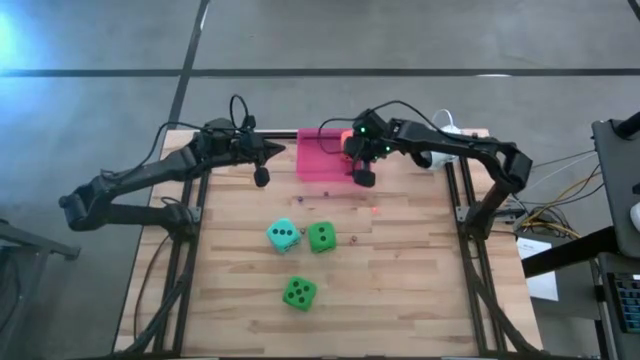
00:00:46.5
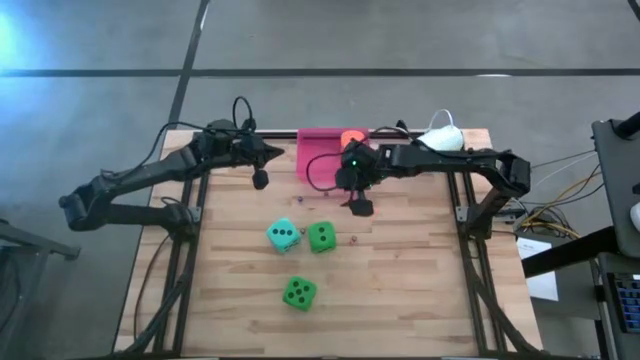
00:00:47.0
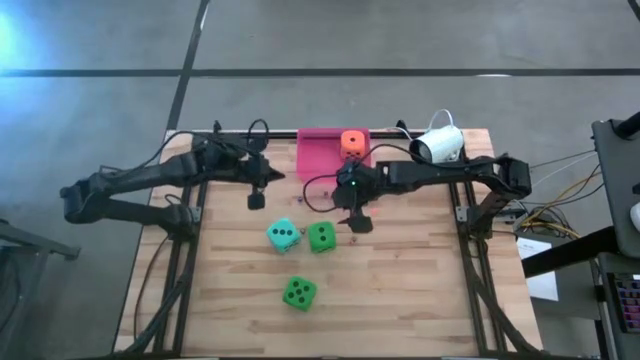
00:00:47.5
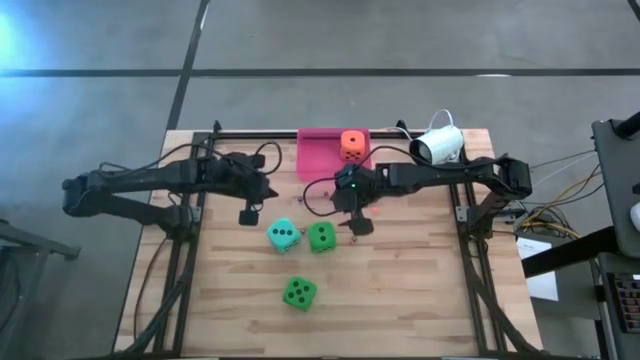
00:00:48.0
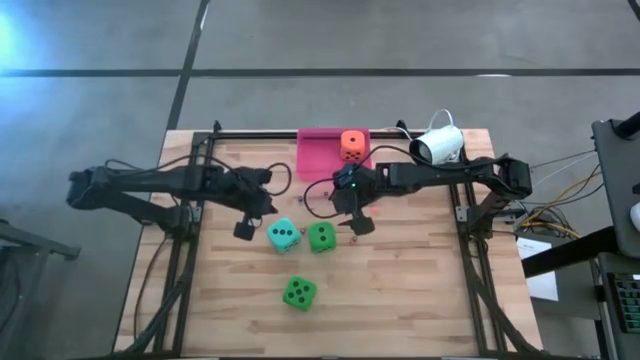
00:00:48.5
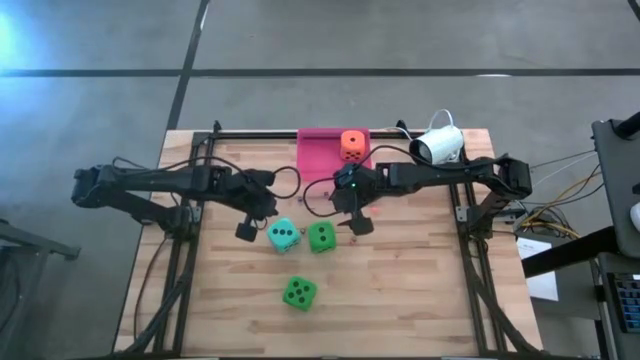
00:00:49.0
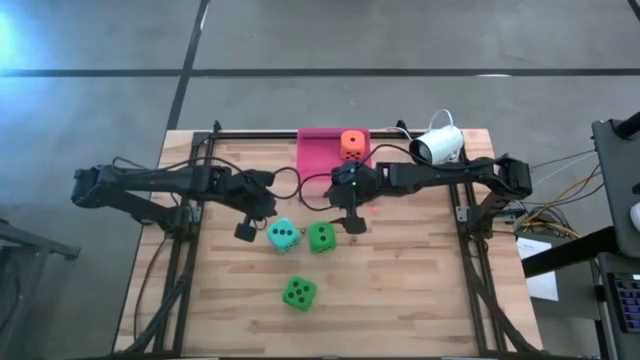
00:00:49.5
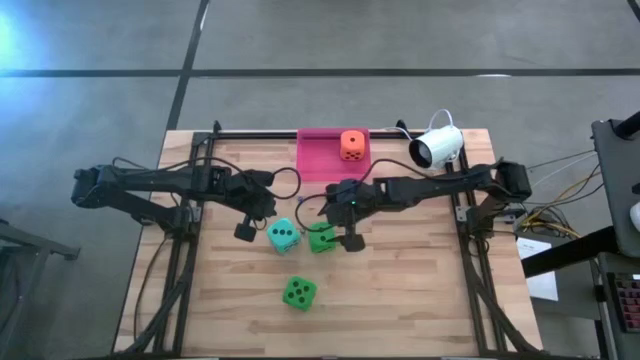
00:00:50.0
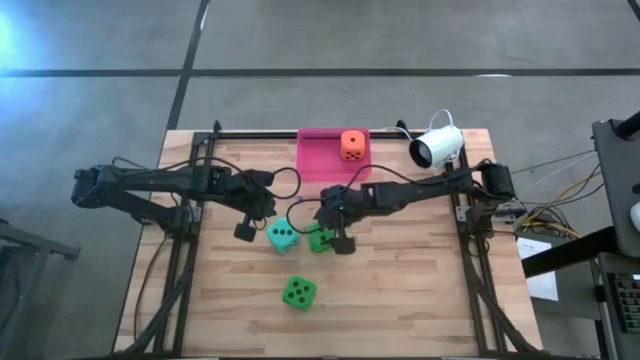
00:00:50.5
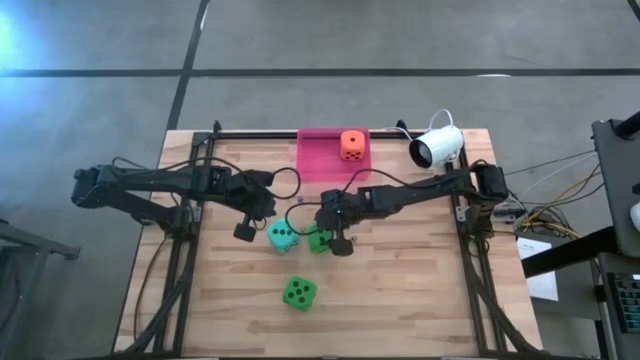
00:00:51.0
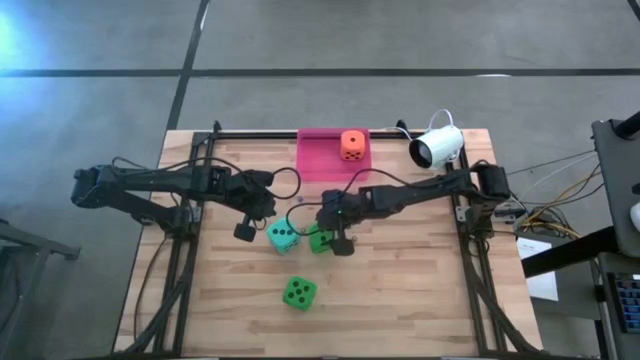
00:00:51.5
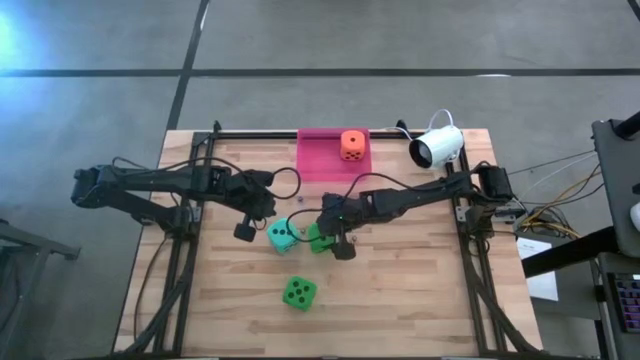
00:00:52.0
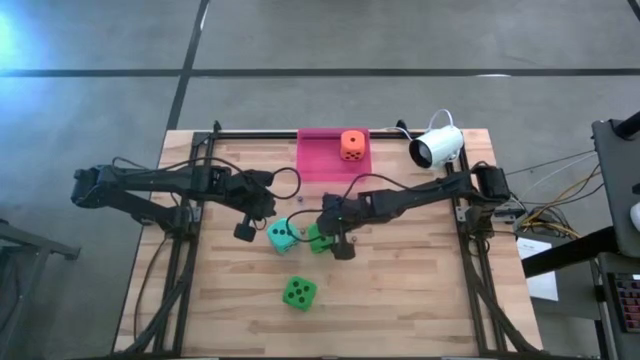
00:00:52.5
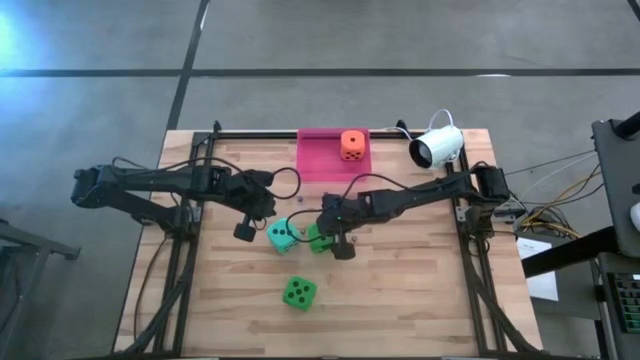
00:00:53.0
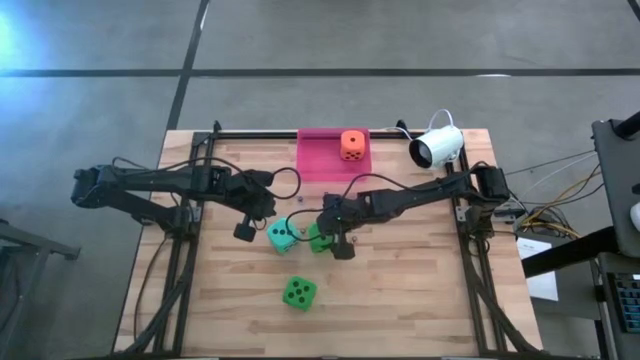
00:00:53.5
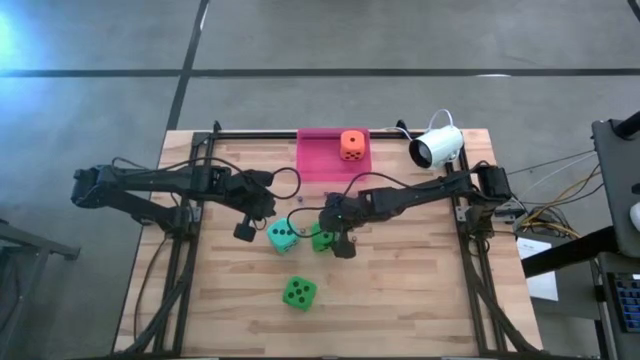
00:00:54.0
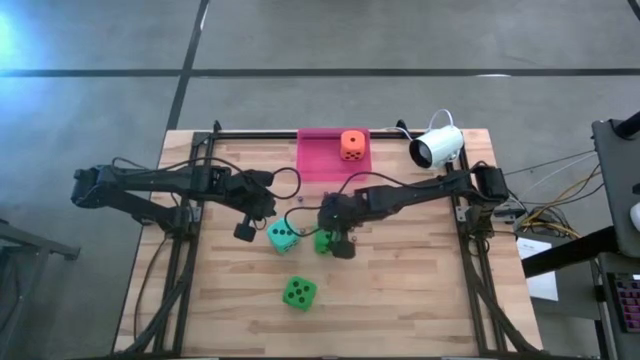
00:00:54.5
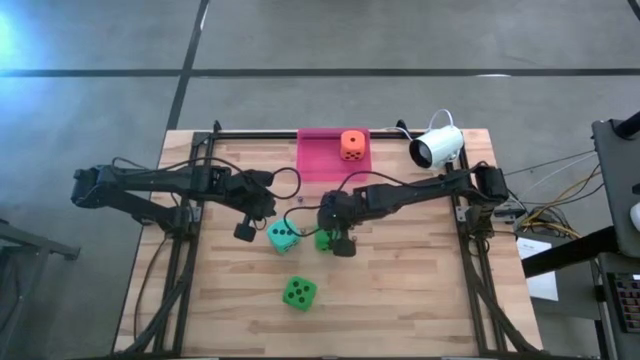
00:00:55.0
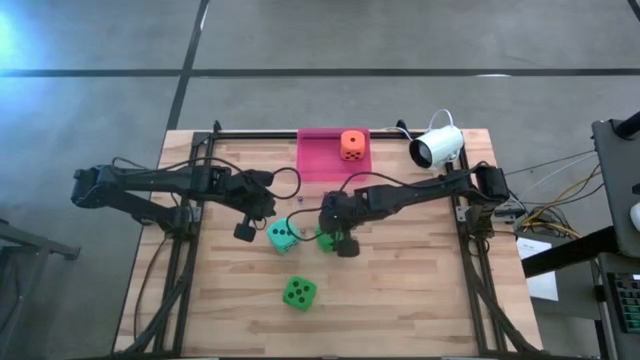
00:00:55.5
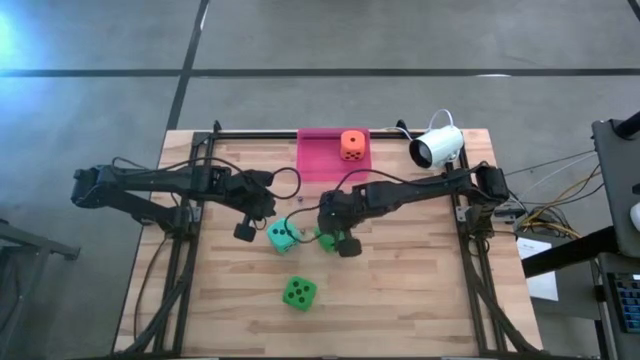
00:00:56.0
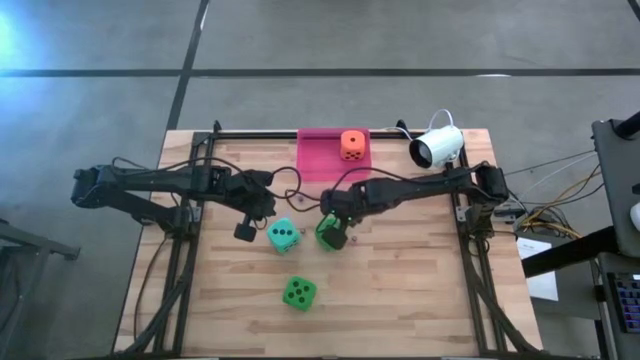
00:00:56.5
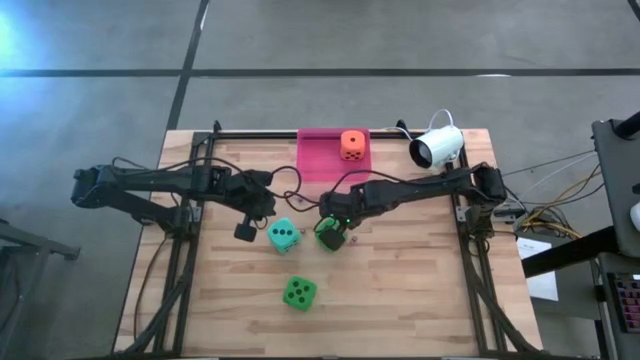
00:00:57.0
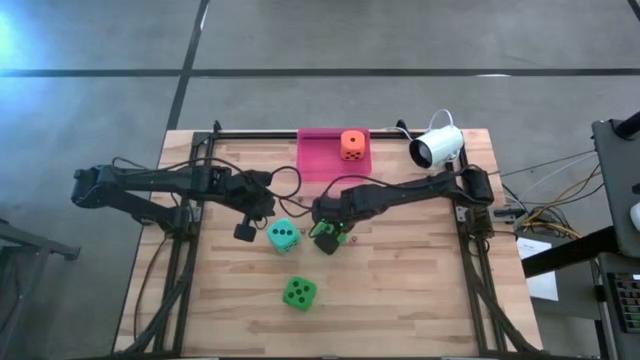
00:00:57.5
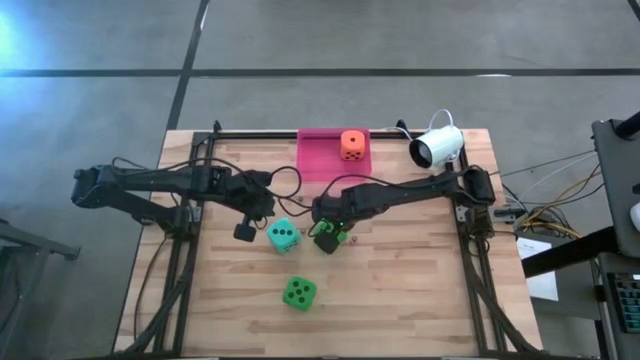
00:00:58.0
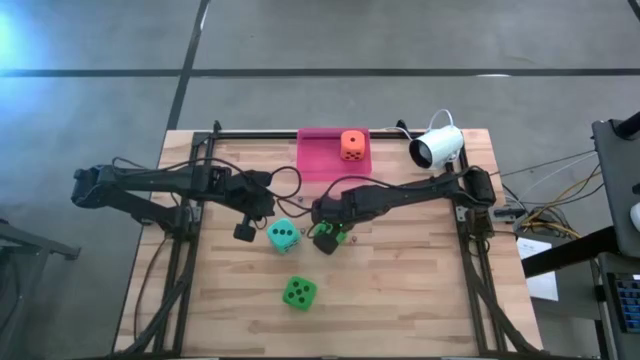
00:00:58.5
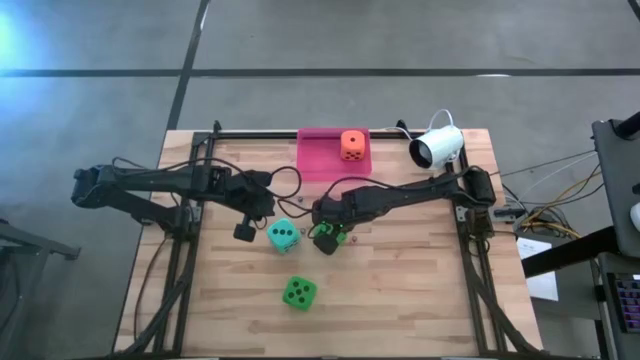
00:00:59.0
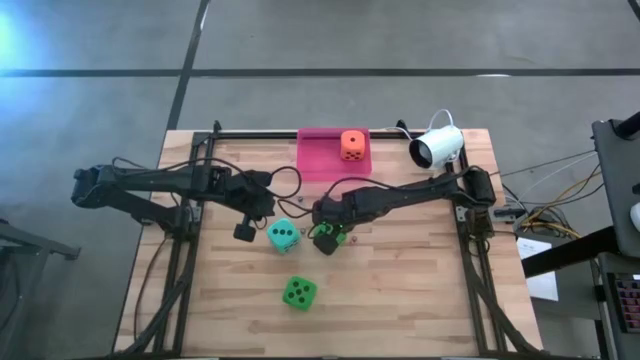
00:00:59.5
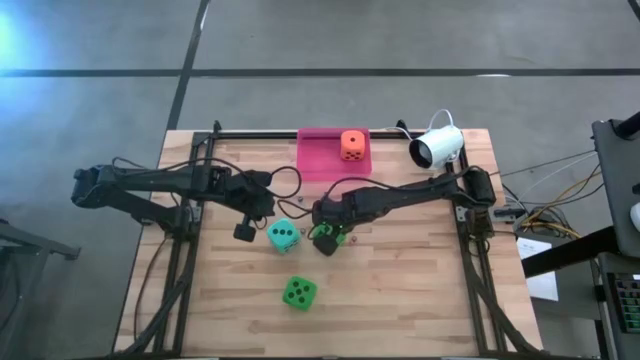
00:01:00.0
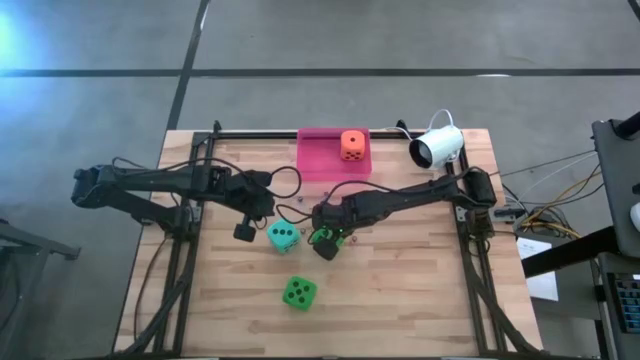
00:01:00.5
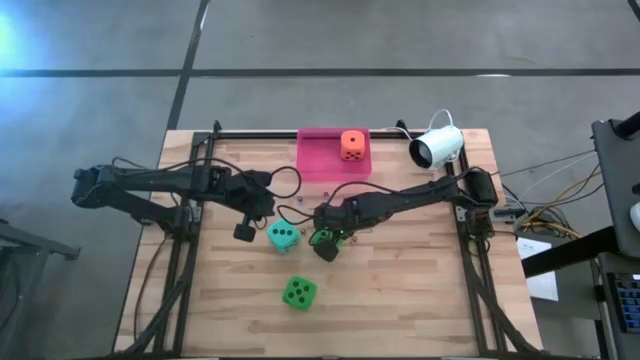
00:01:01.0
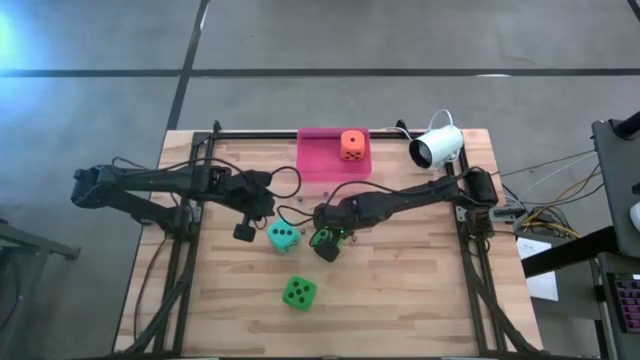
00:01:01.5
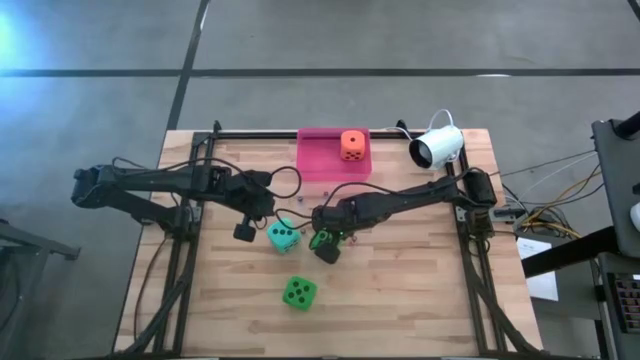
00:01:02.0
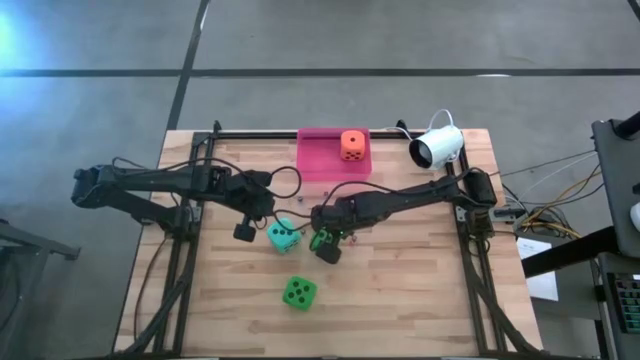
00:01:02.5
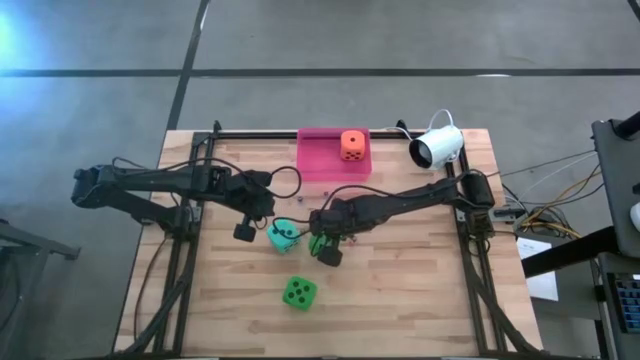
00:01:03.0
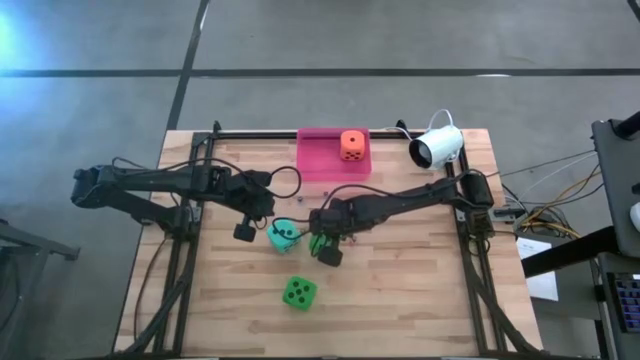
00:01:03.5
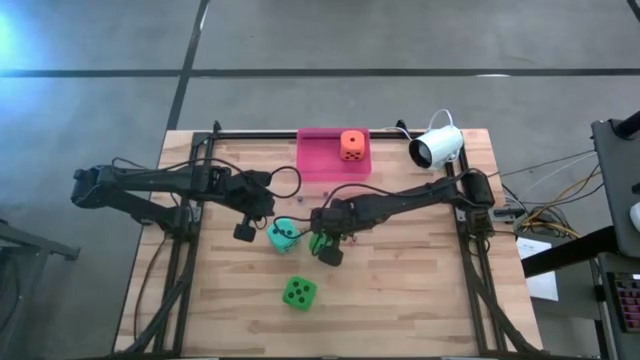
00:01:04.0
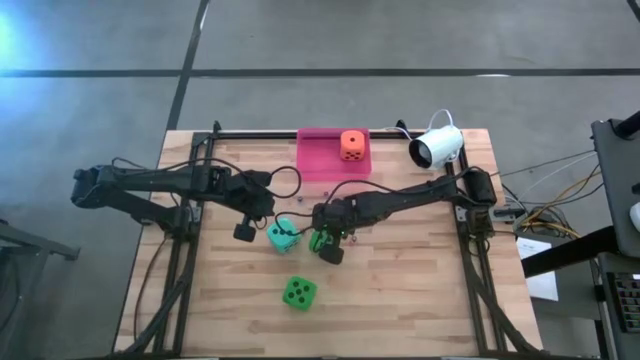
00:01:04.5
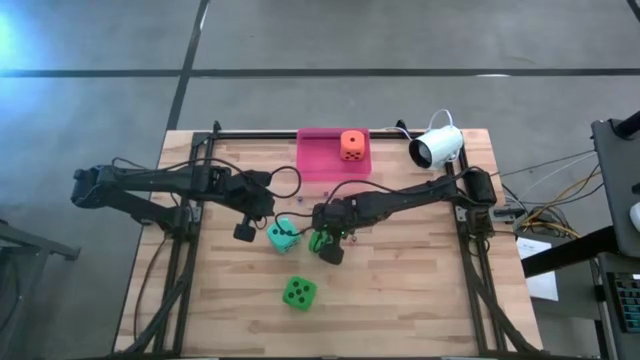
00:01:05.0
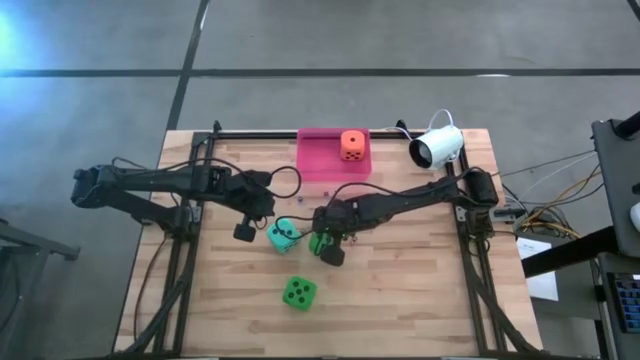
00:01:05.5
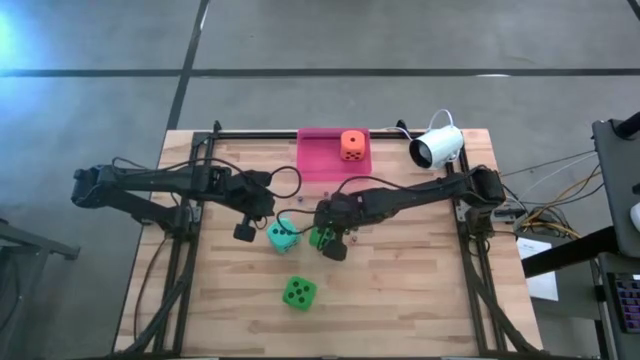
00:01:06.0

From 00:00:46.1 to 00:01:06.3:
Task: Pick & Place Dice
Put the top large green dice into the the pink bin
